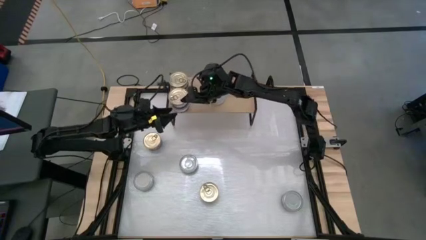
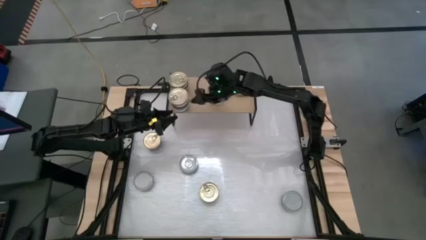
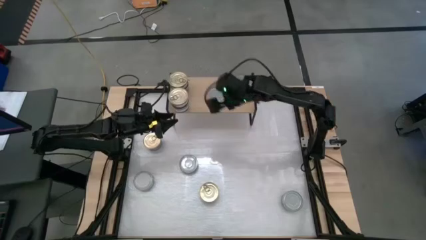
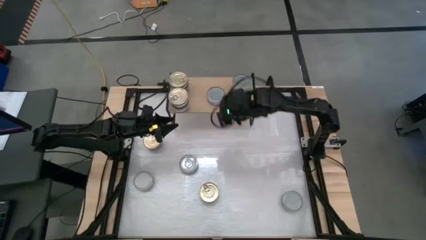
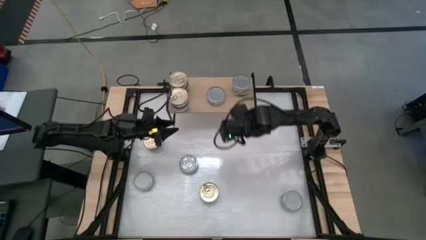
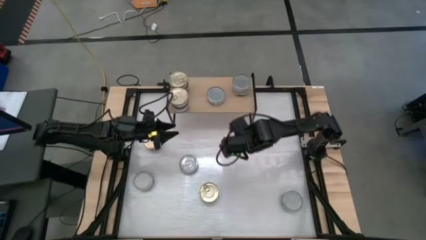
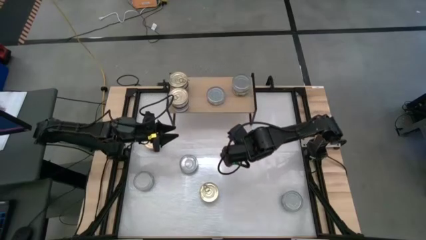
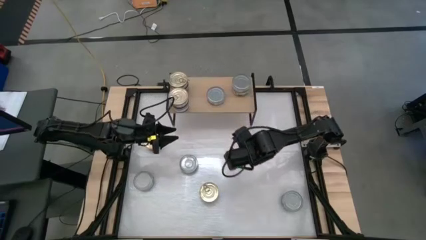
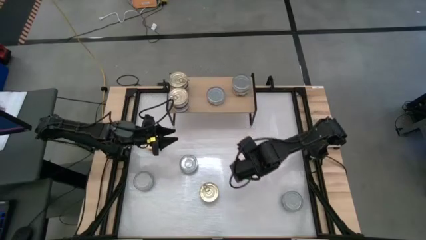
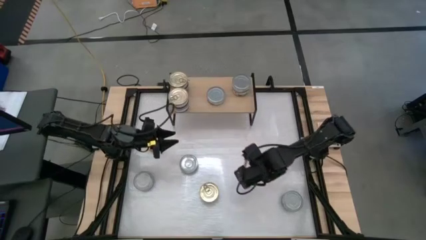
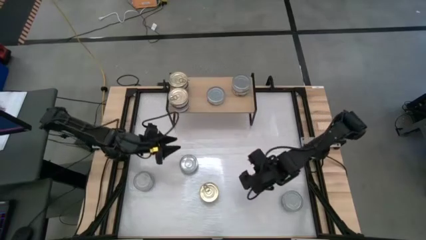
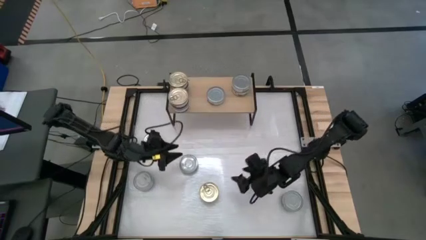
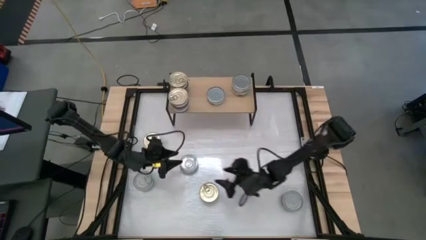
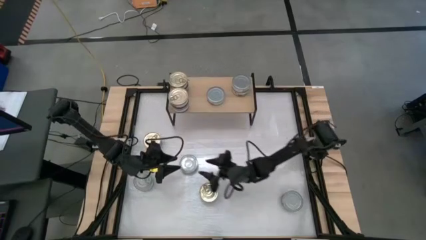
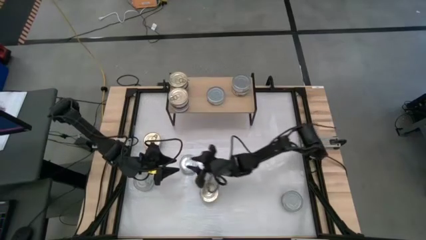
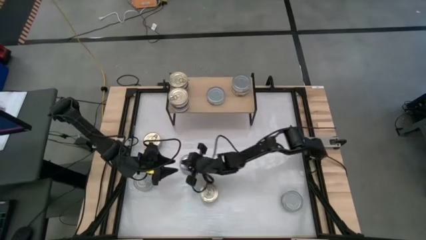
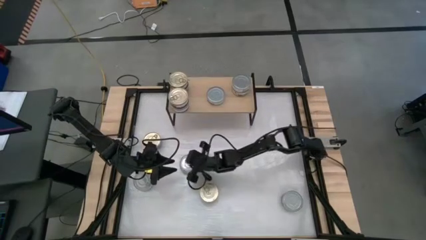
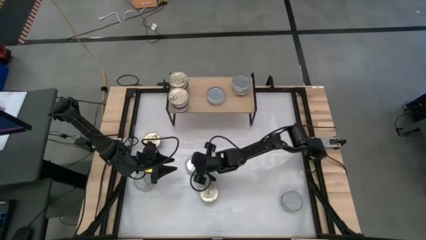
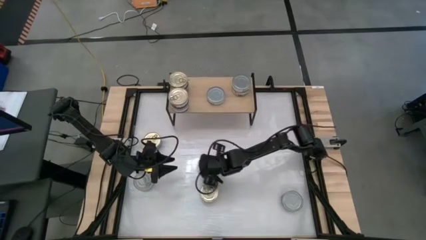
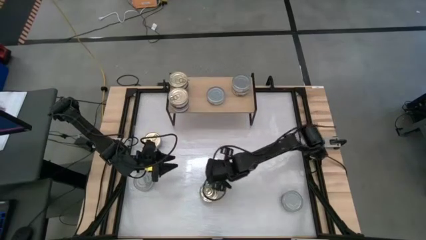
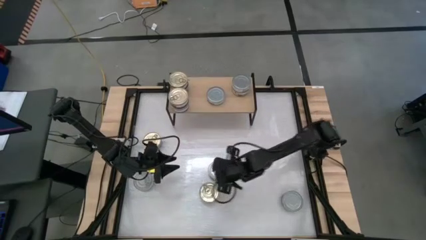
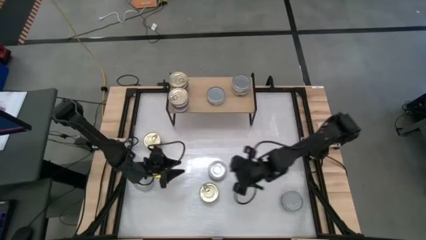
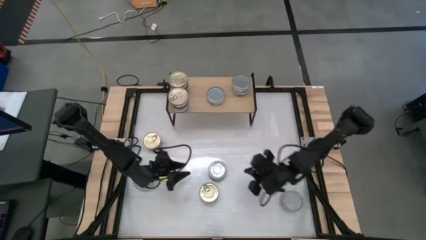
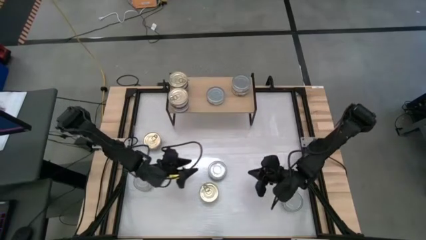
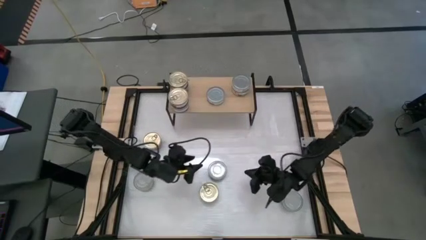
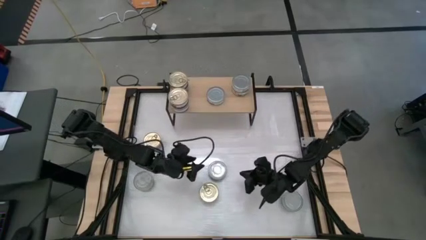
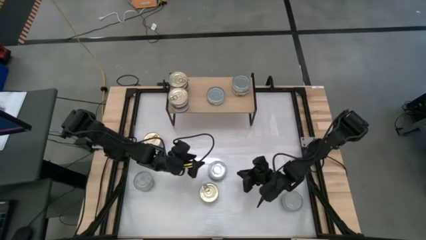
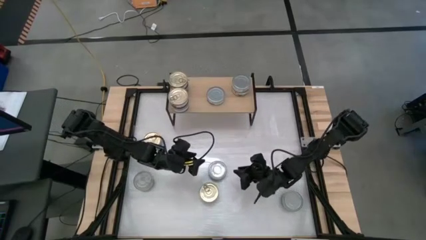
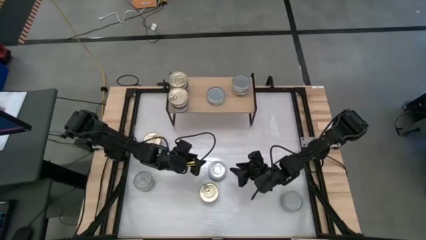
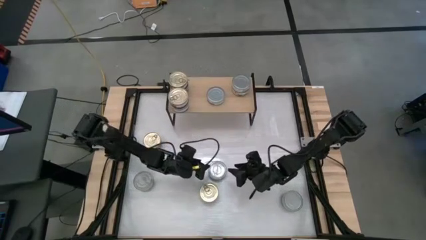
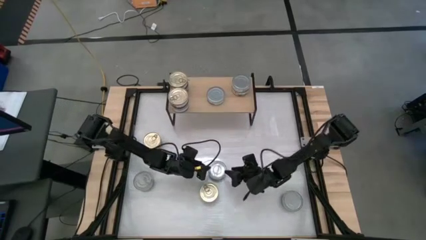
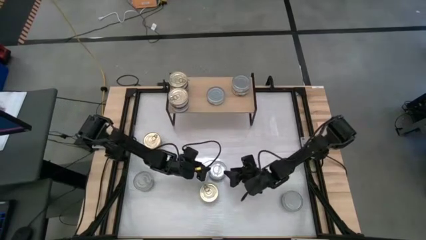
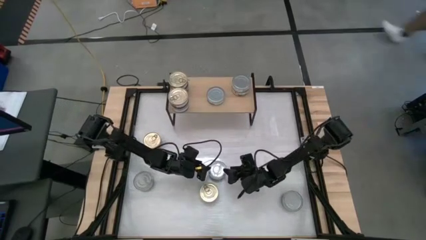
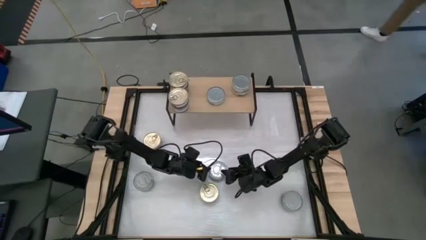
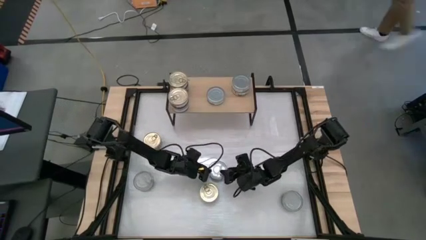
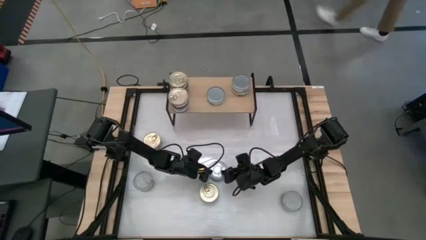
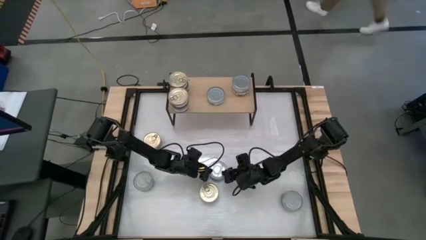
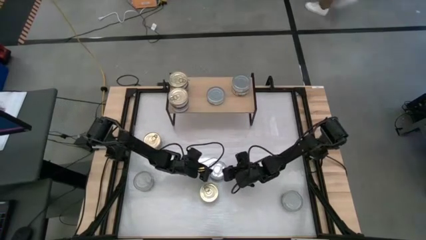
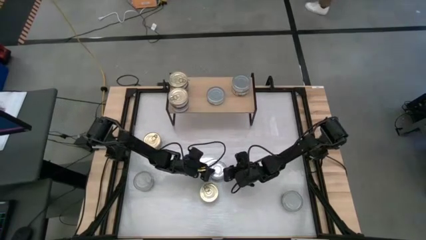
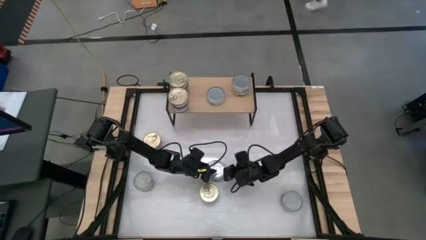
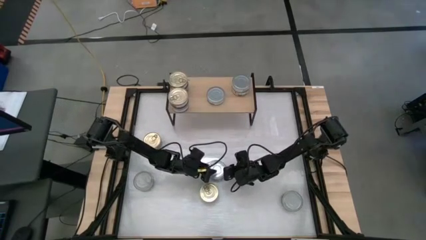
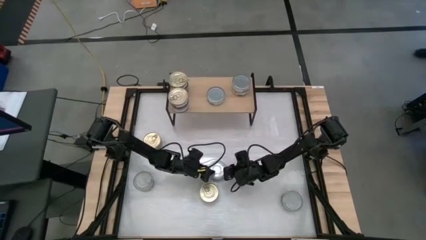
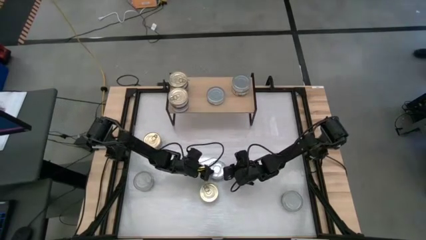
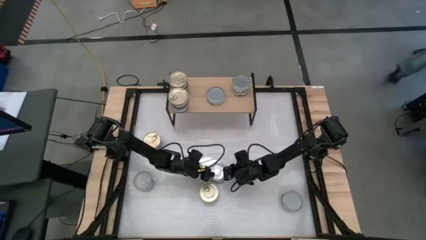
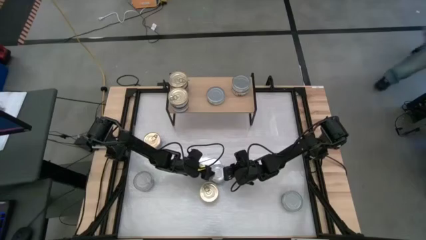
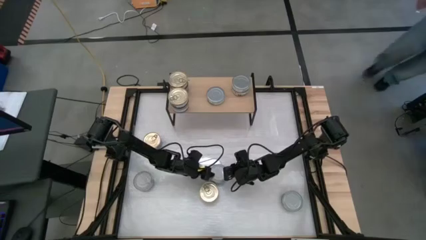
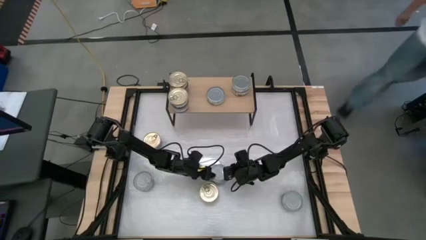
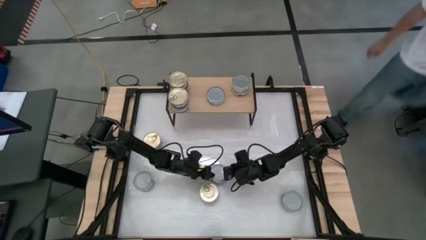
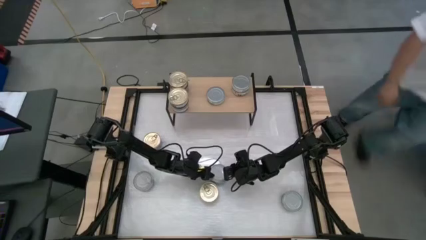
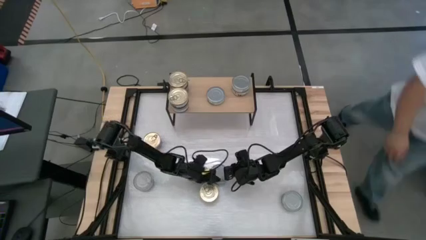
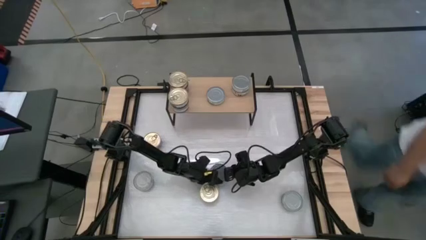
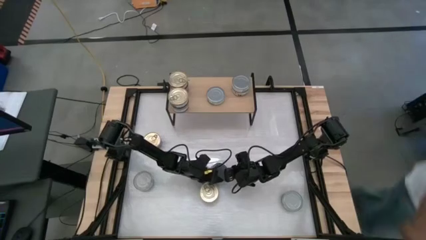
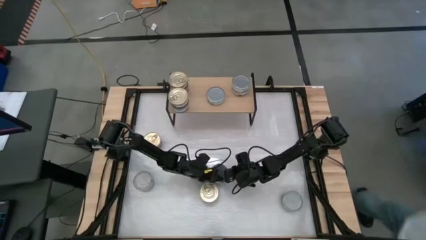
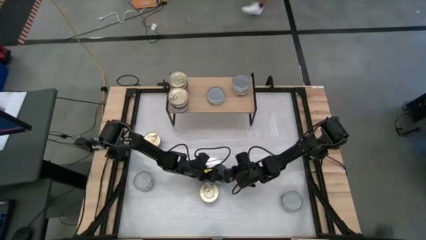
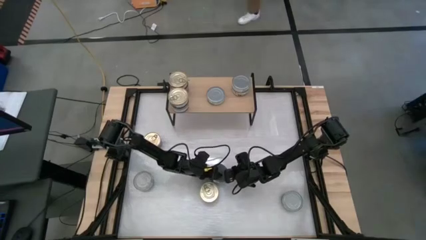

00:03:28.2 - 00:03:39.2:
Task: Stack canned seafood by type on shelf
Stack the green and white tuna can on top of the other green and white tuna can on the shelf

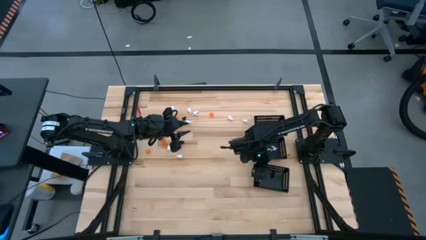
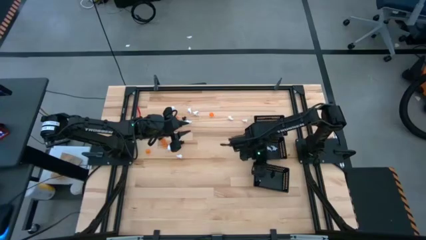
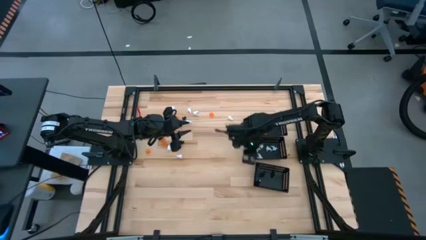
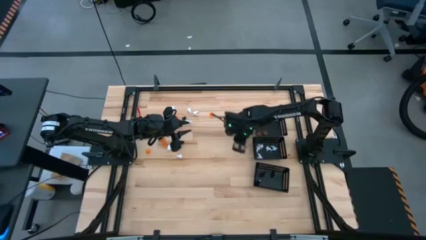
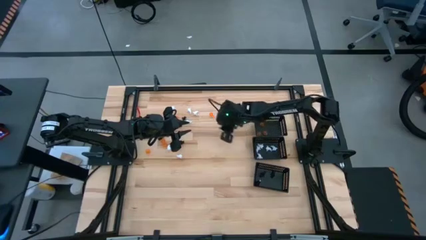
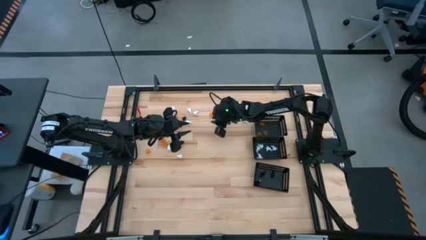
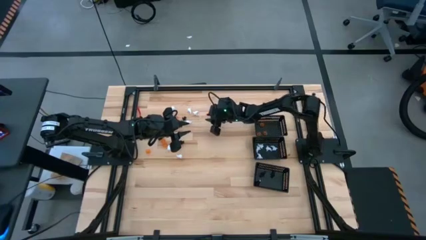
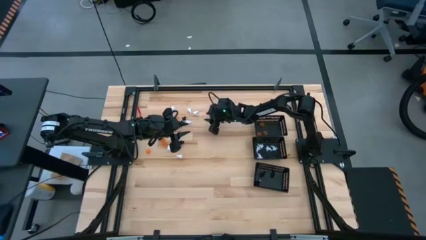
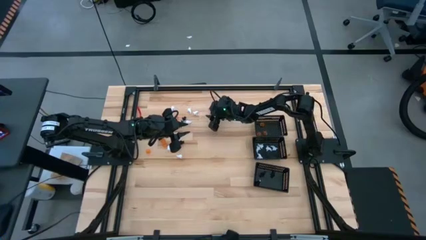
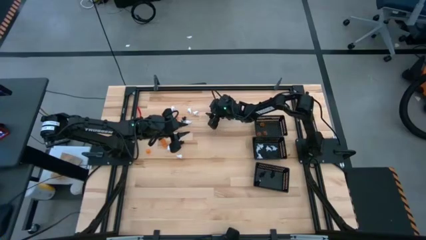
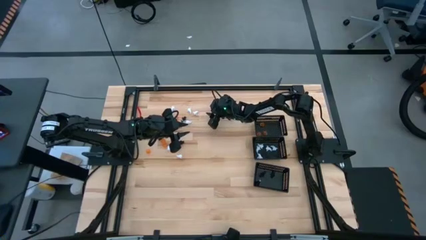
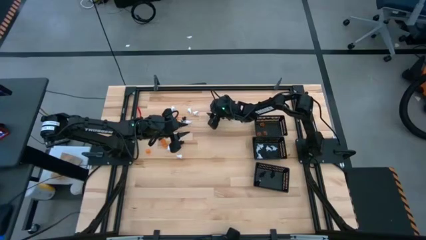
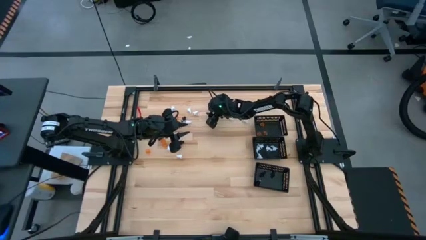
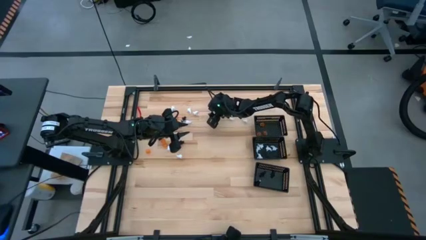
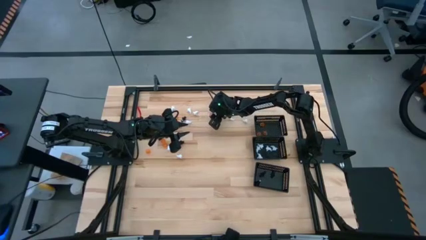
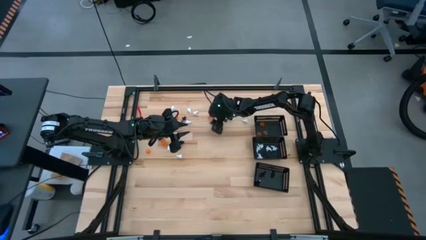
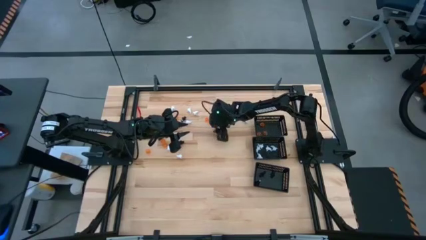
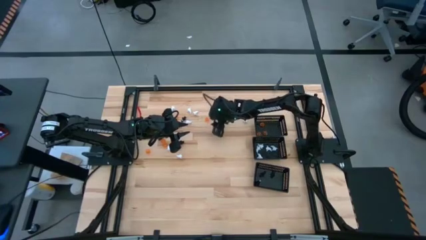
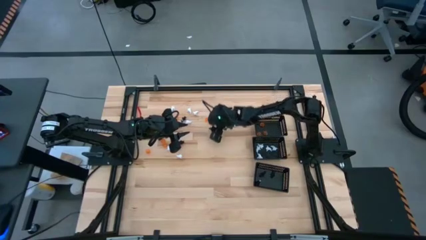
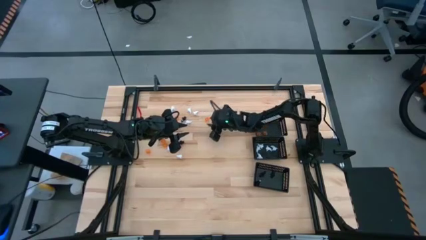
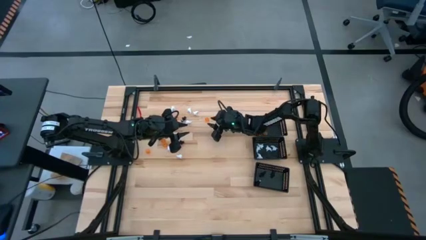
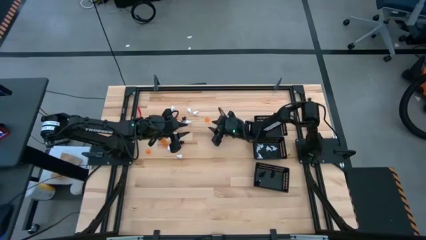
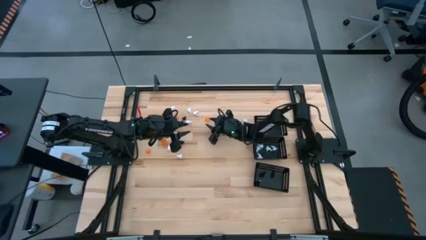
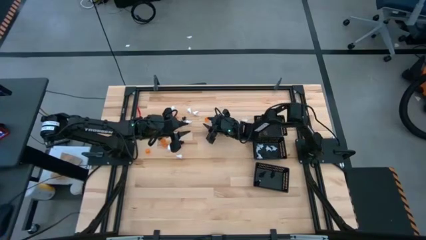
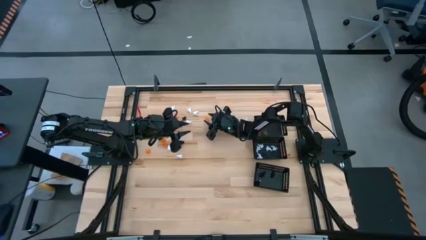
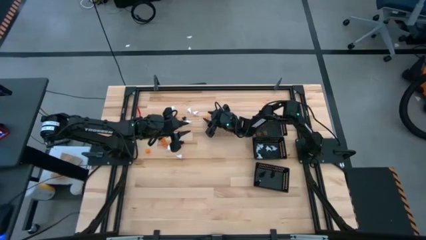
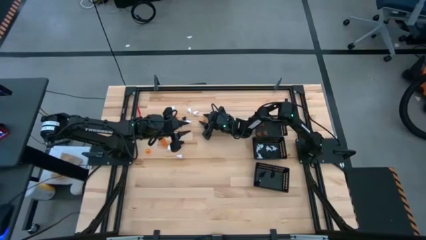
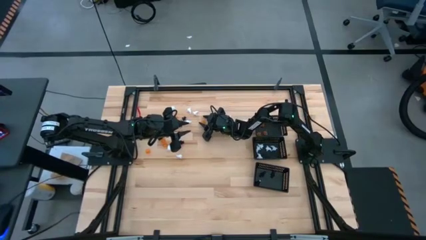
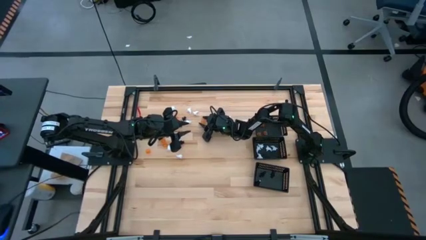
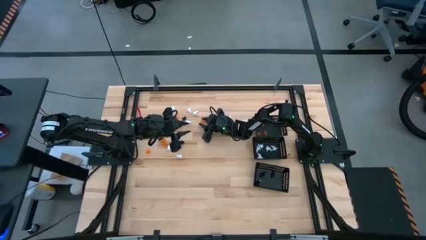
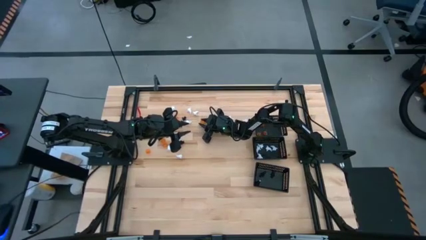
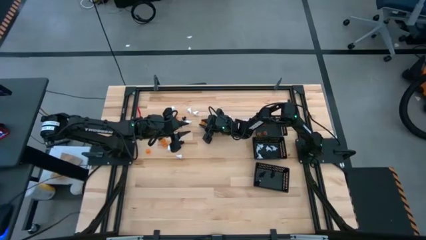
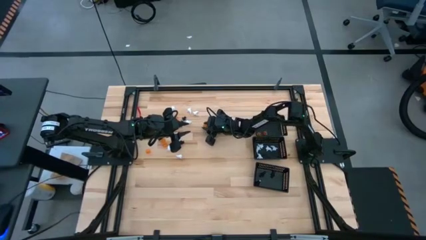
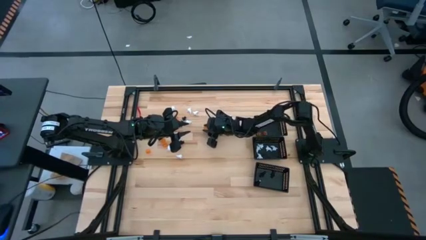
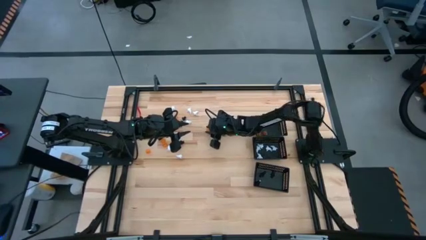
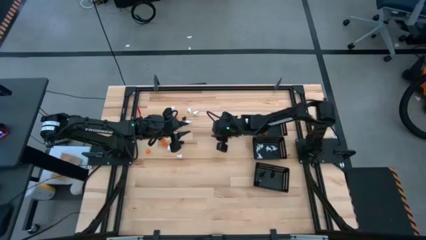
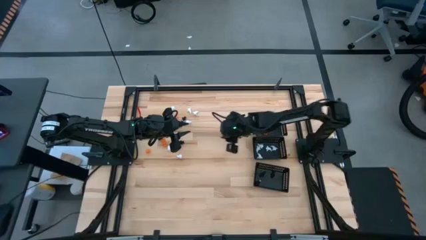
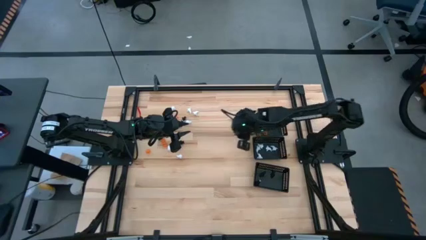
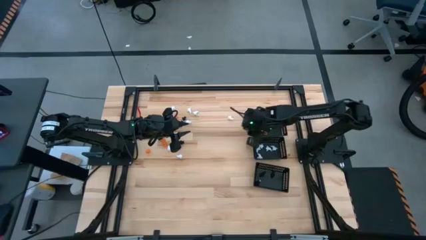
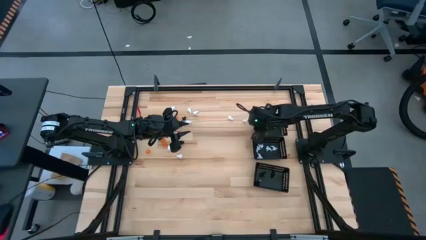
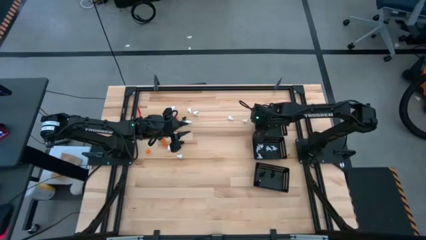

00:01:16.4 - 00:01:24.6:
Task: Sort Halloween decoration
Put the orange pumpkin toy into the top black bin
